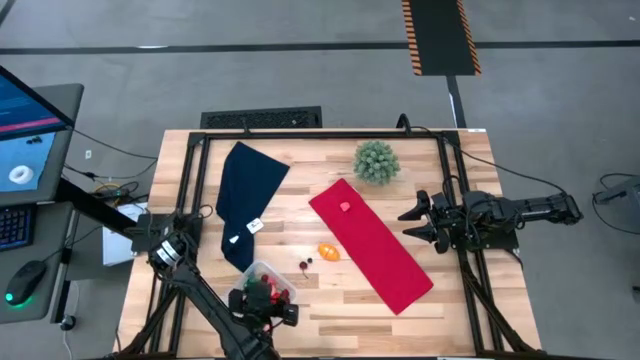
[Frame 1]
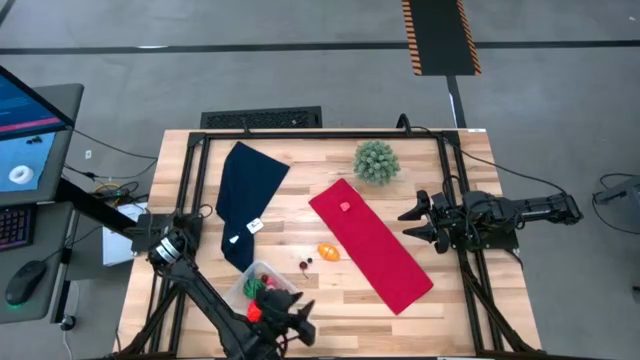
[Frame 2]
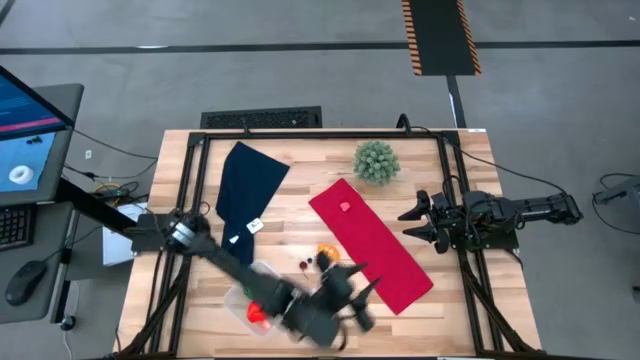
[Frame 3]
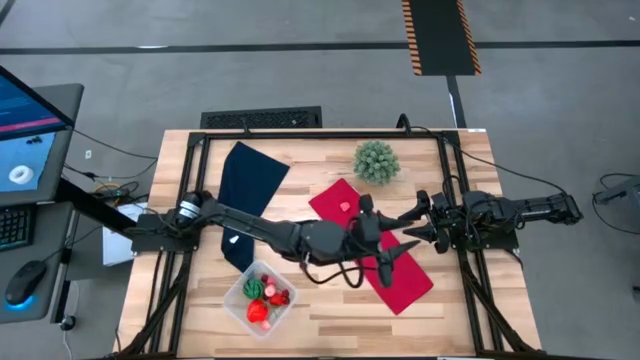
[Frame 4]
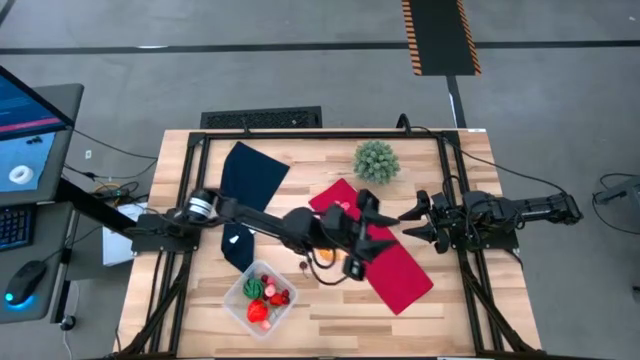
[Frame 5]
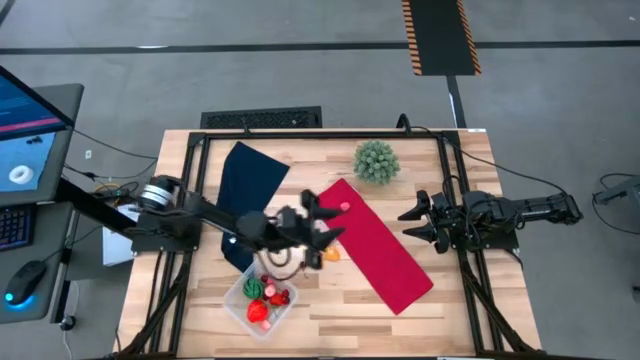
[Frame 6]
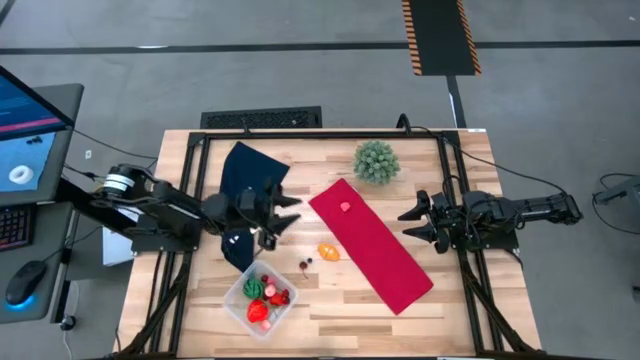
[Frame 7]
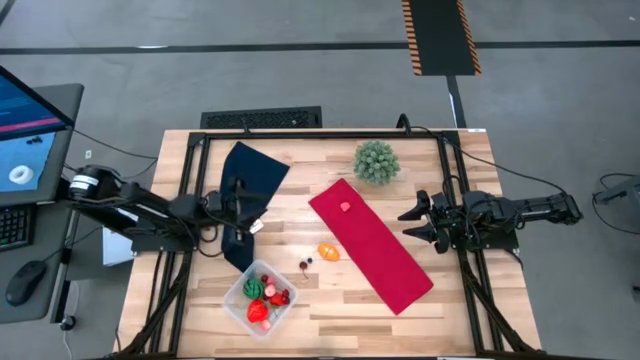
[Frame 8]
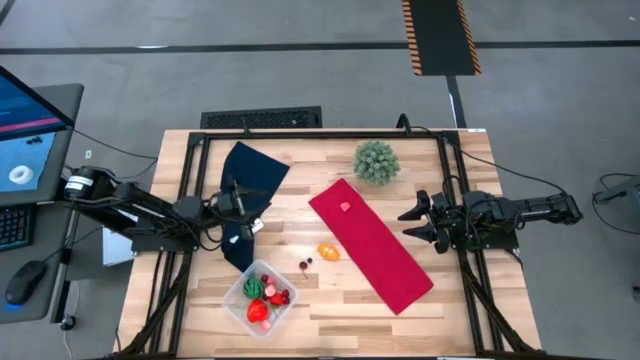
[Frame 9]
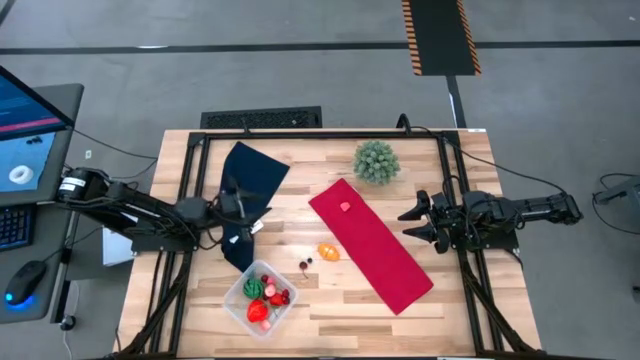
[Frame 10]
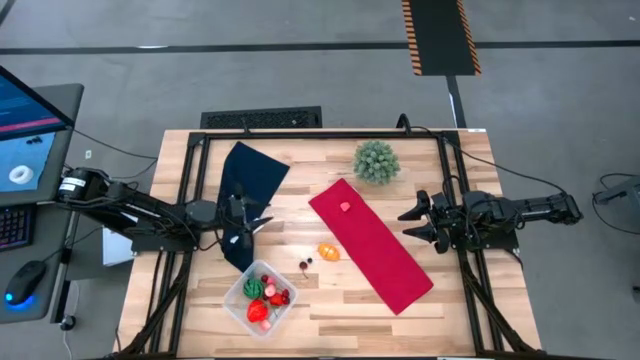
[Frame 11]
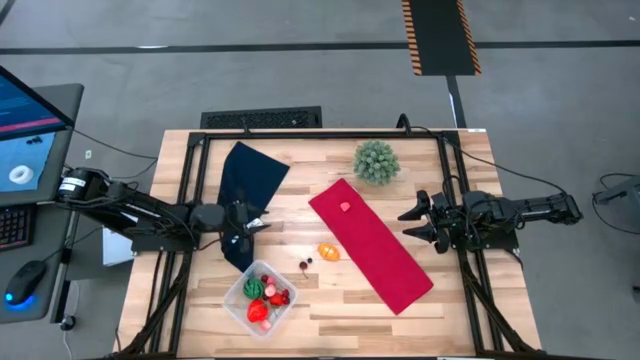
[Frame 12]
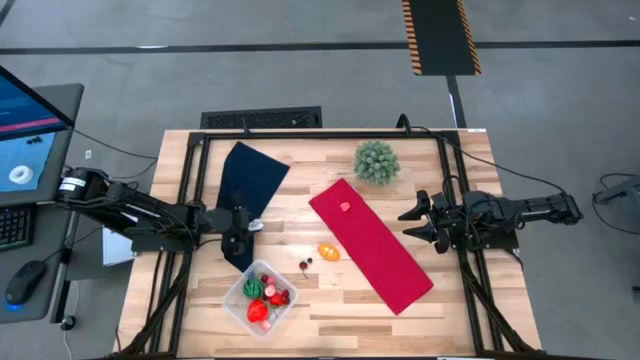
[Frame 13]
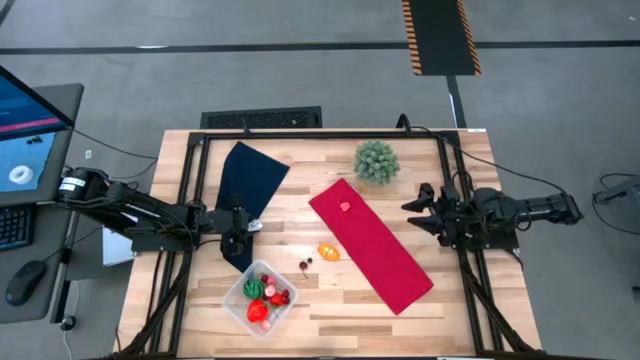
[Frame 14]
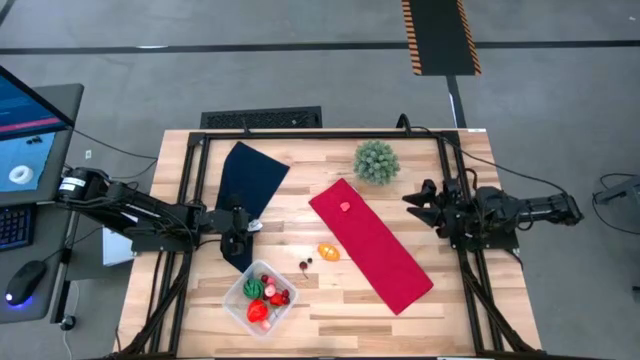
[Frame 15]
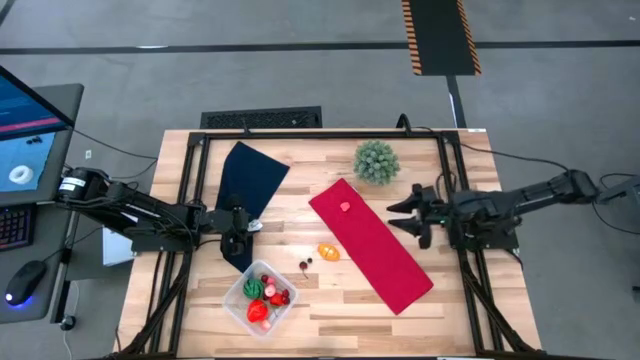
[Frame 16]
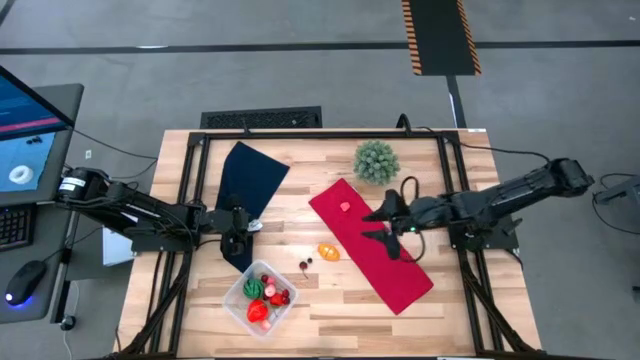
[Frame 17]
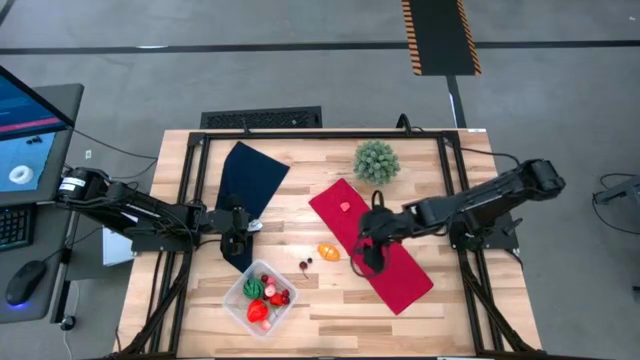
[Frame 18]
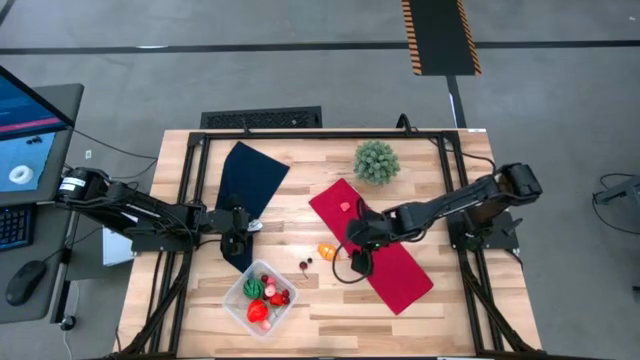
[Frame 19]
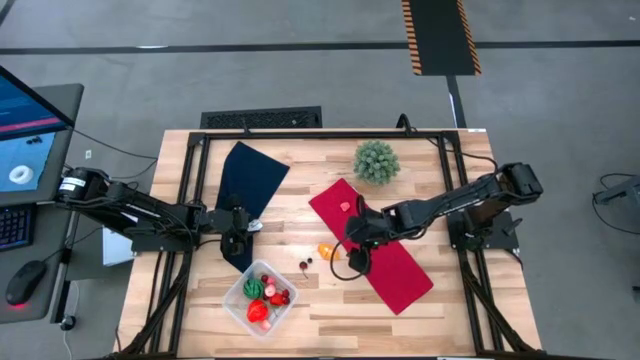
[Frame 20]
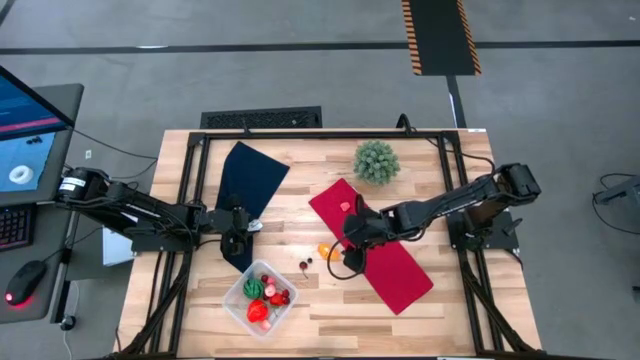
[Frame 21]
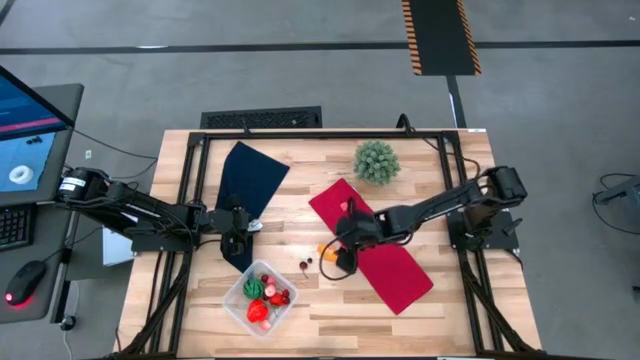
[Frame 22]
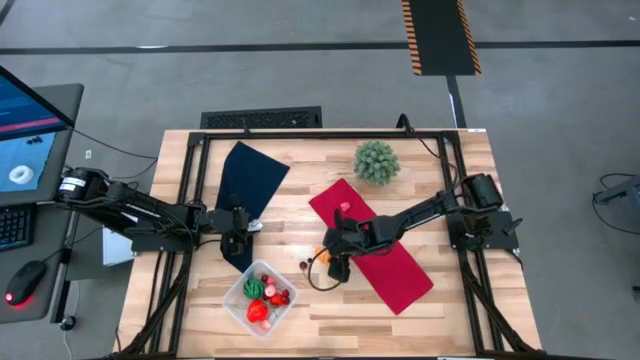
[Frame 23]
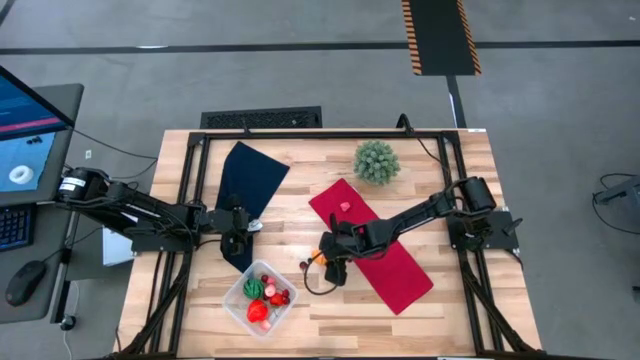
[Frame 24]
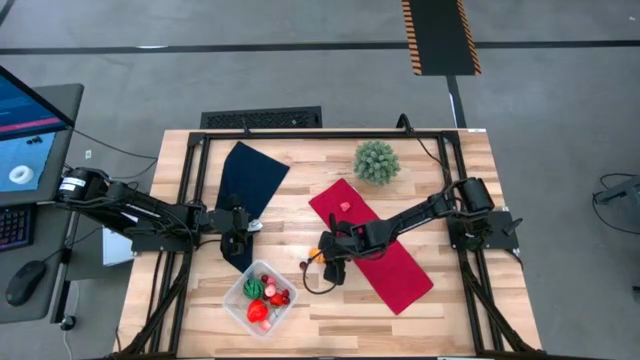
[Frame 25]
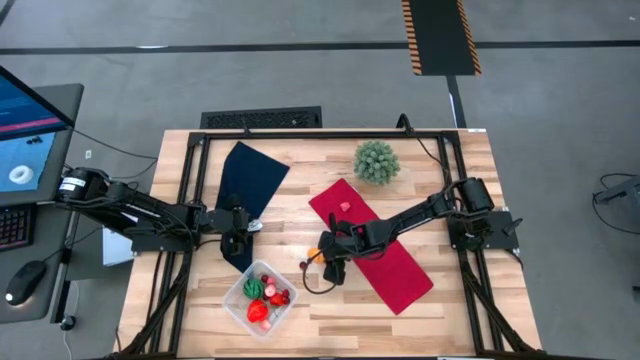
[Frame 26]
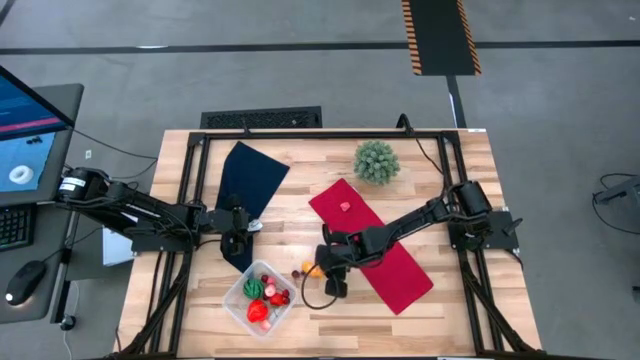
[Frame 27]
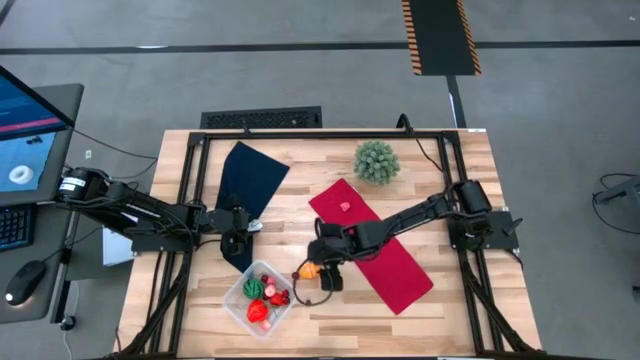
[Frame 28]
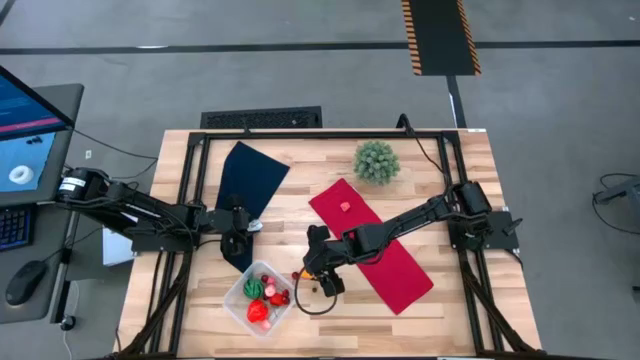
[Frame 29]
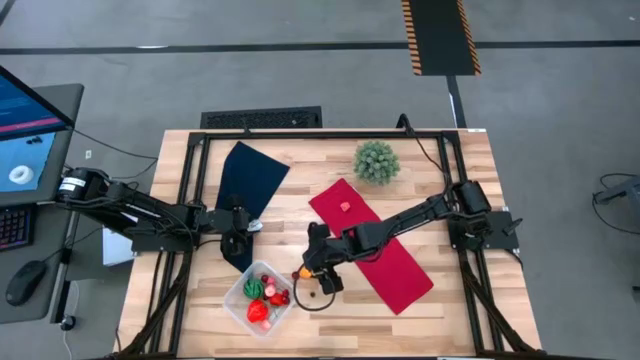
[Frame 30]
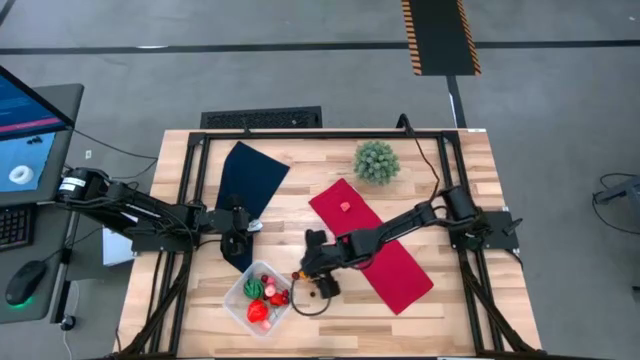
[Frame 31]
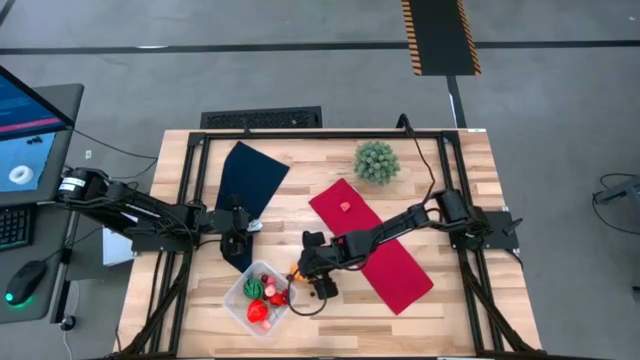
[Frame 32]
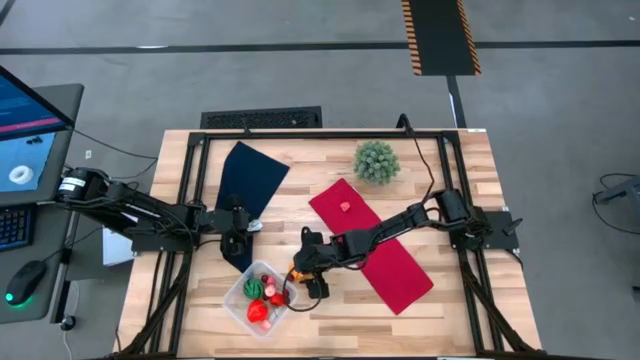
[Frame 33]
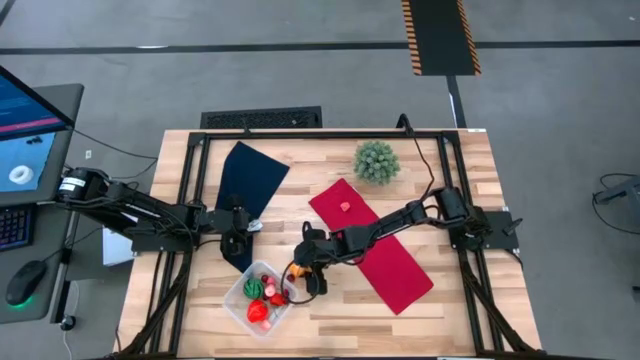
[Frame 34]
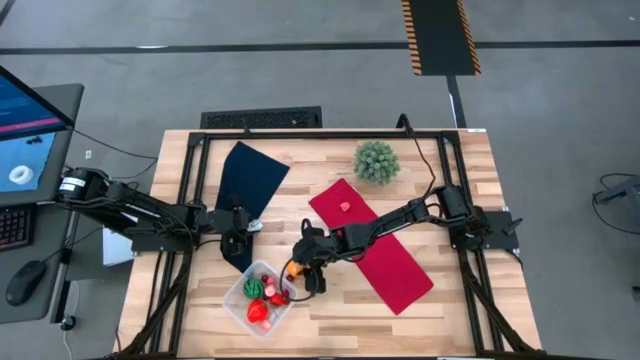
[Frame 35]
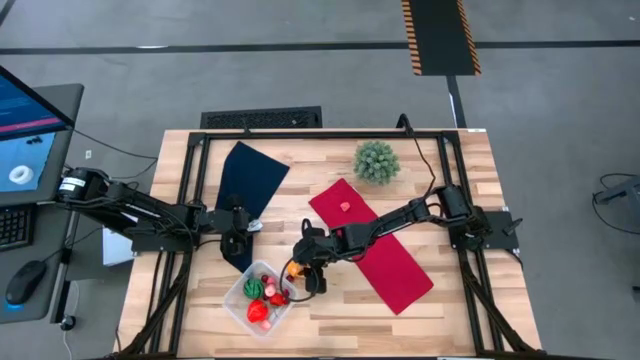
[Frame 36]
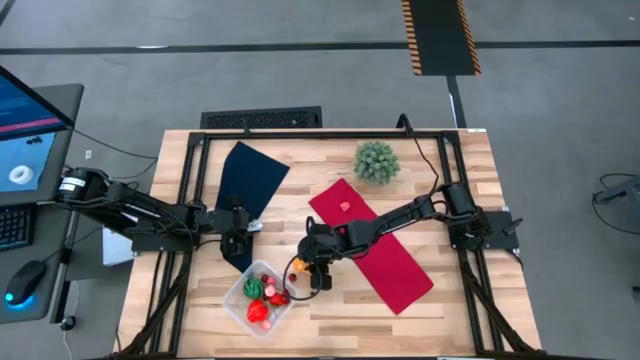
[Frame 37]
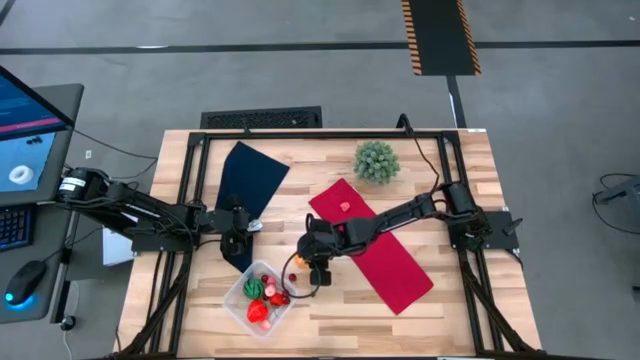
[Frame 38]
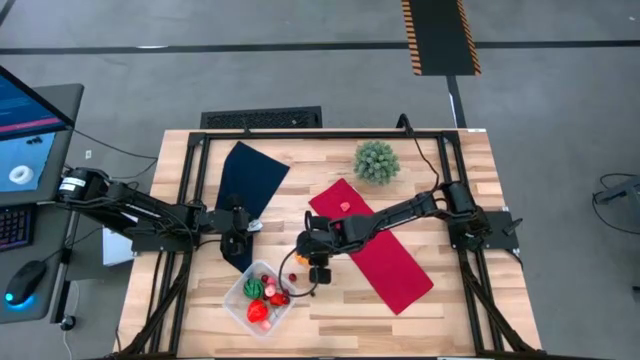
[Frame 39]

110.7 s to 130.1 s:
Task: Pick and placing Produce into tupperware
Put the croissant into the transparent bin

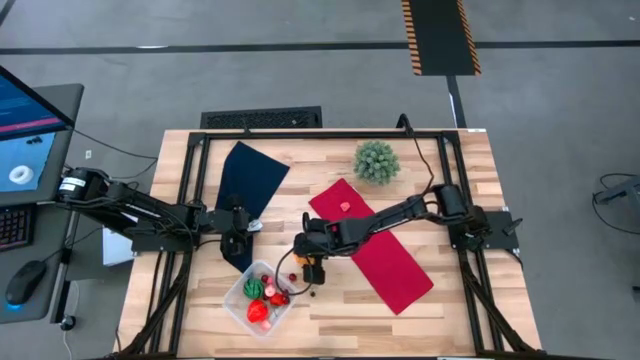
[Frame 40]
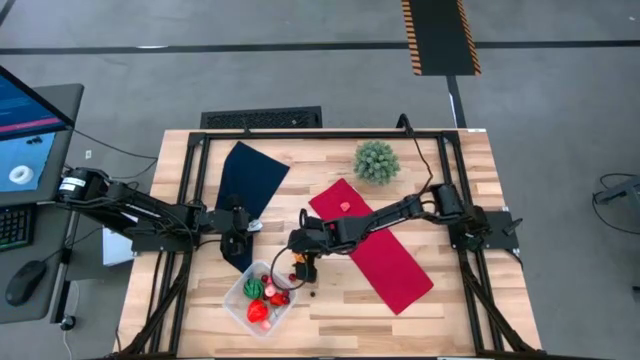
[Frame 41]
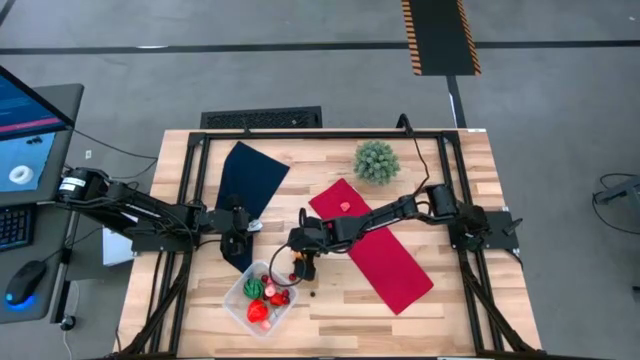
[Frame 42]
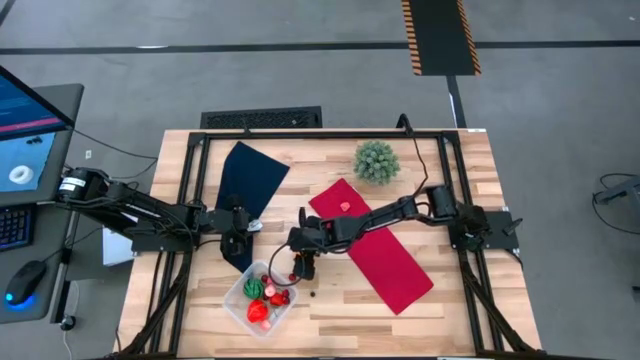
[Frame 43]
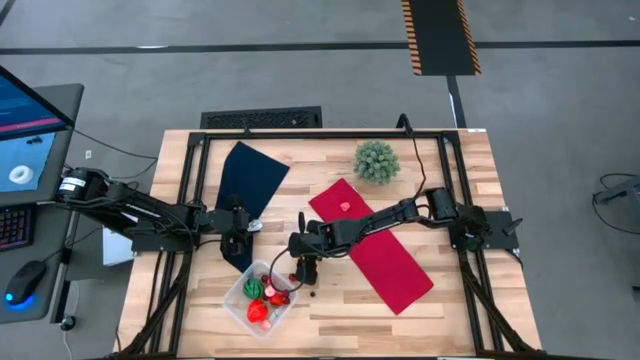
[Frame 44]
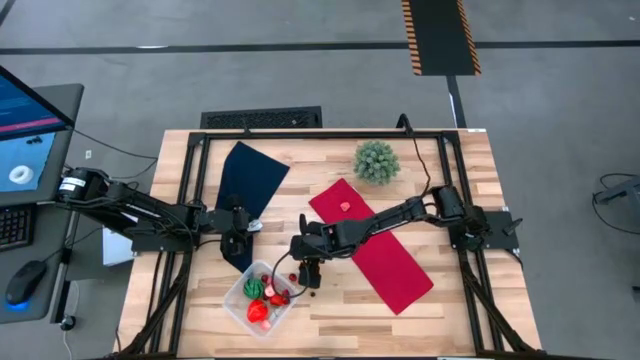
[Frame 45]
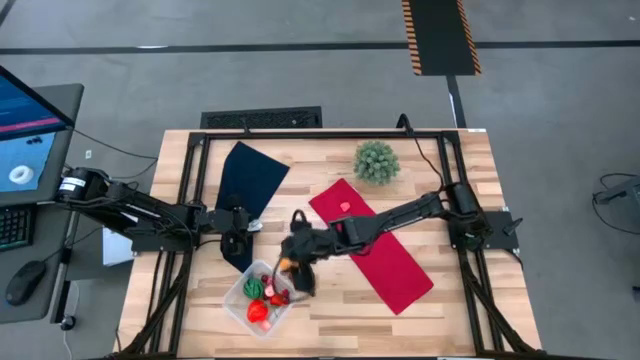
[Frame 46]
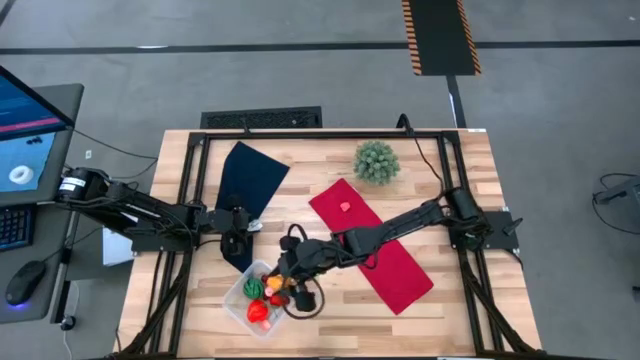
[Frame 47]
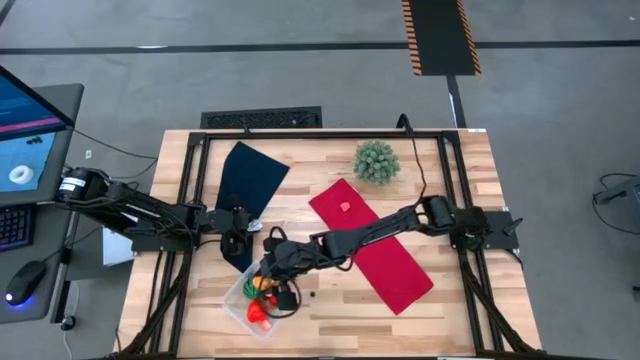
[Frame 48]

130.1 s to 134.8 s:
Put the croissant into the transparent bin
